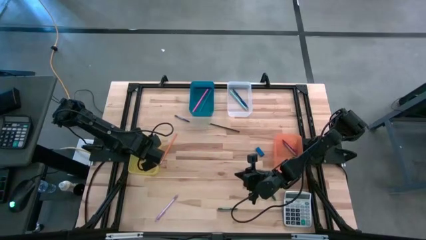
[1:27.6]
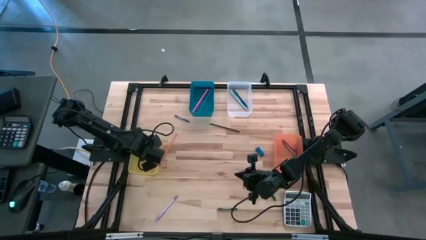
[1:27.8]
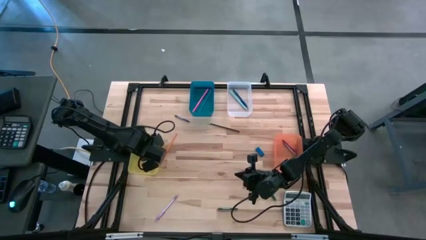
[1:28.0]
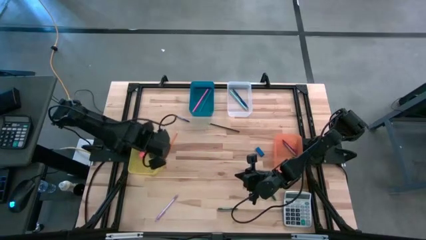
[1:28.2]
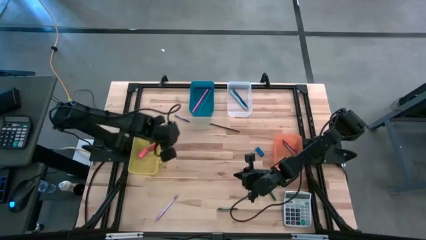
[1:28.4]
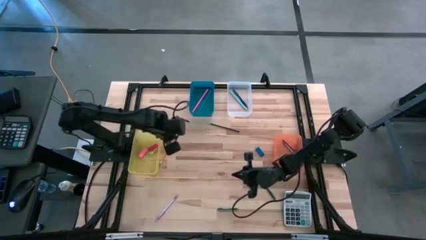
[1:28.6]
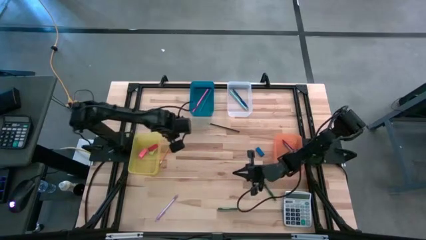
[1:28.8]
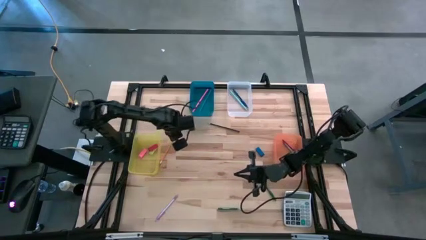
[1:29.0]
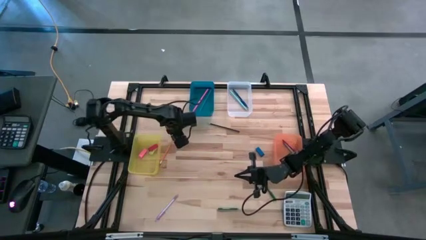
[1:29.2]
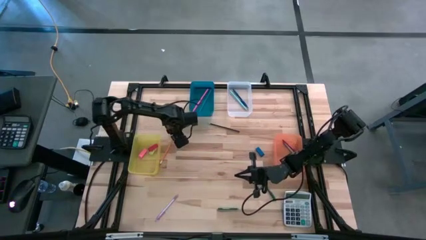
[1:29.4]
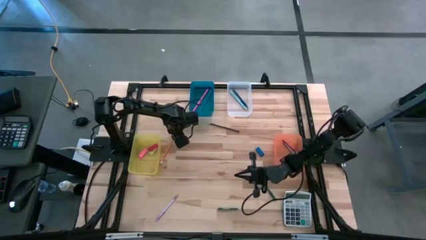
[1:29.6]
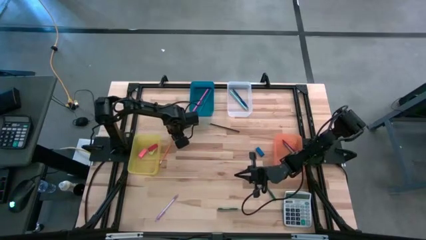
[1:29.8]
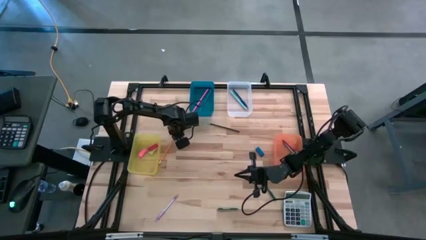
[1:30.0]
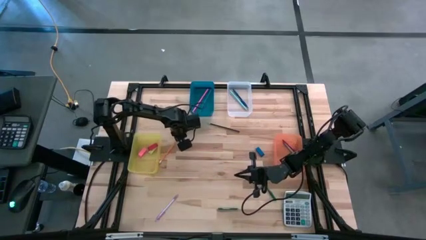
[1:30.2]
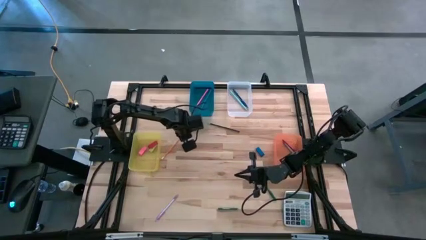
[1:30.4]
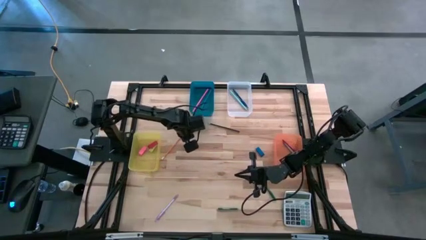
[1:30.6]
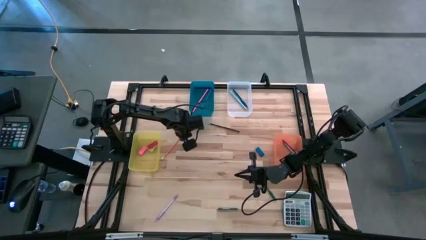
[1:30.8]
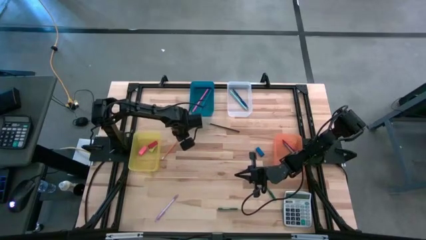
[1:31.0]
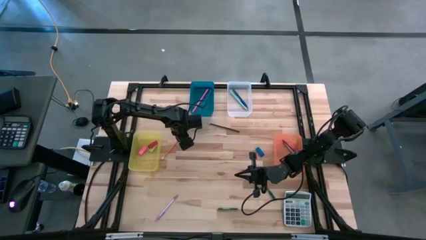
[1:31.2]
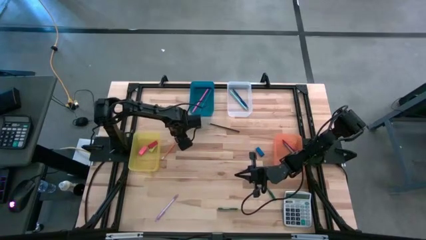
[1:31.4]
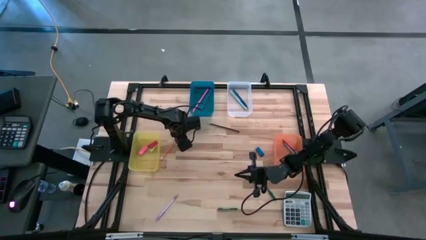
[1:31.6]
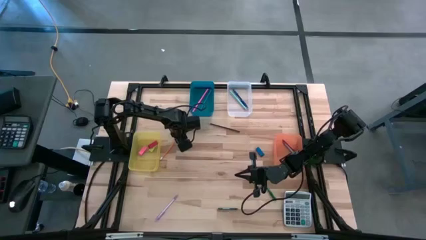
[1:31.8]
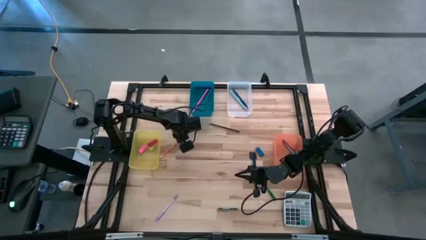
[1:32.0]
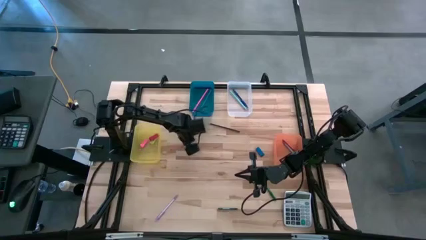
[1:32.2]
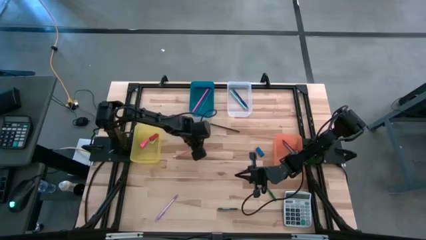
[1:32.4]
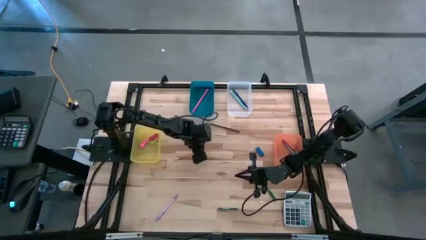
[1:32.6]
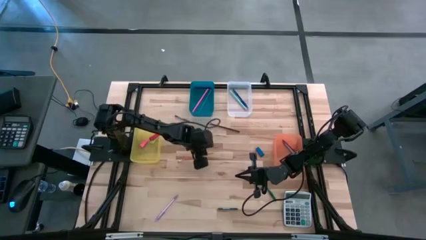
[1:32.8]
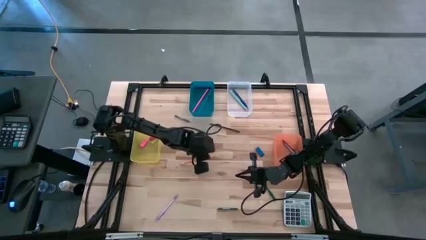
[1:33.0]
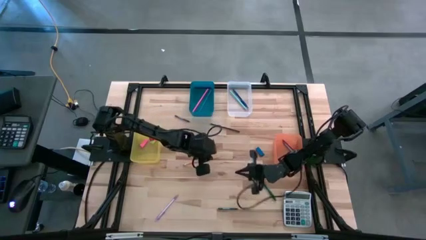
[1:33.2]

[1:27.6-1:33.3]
Task: Sort crayons/erasers/pens/pencils in bins
Put the orange pencil into the blue bin

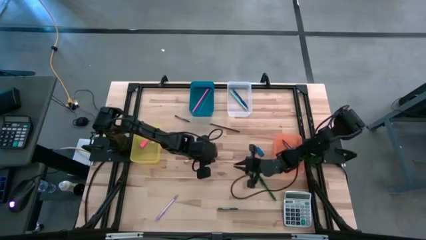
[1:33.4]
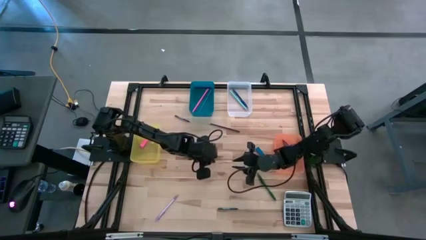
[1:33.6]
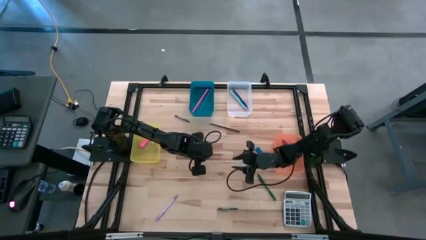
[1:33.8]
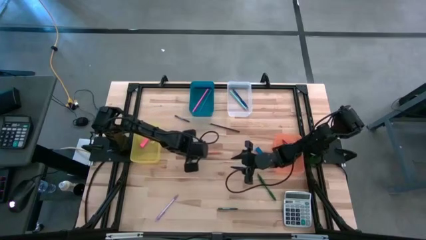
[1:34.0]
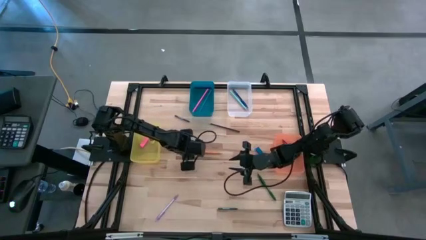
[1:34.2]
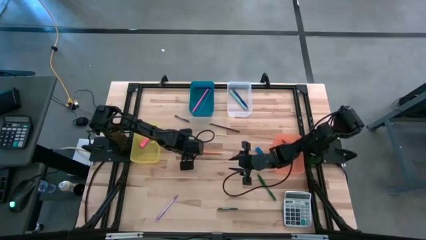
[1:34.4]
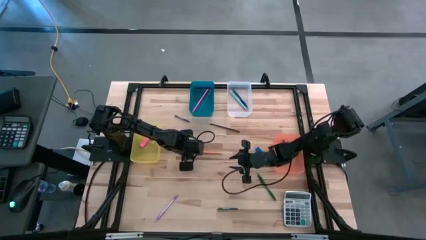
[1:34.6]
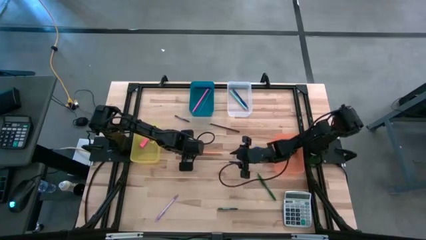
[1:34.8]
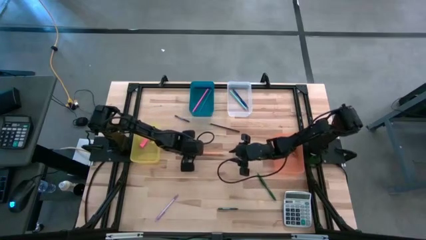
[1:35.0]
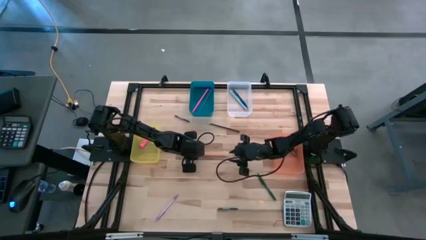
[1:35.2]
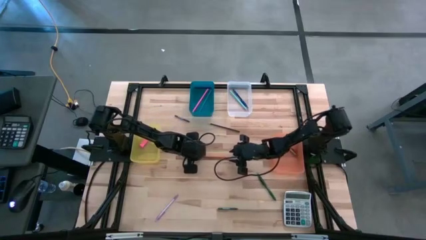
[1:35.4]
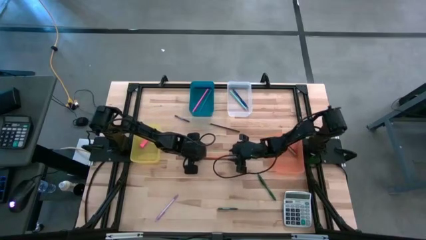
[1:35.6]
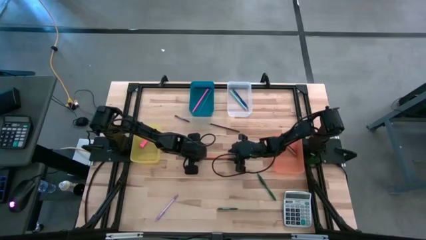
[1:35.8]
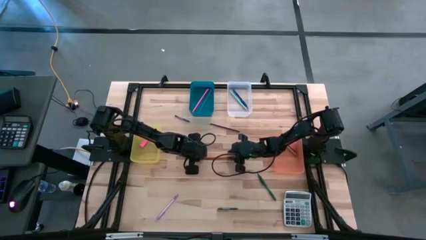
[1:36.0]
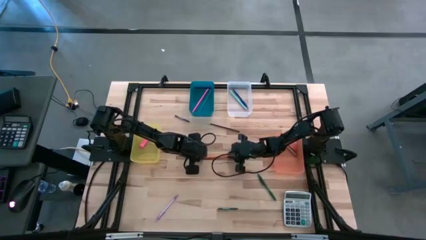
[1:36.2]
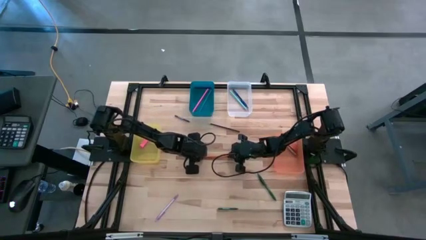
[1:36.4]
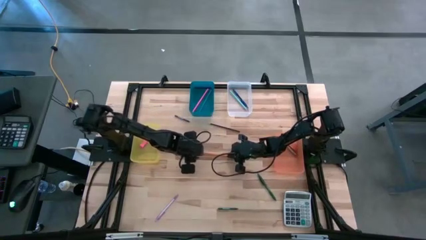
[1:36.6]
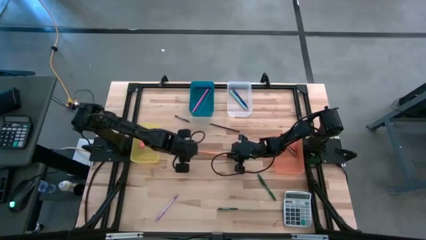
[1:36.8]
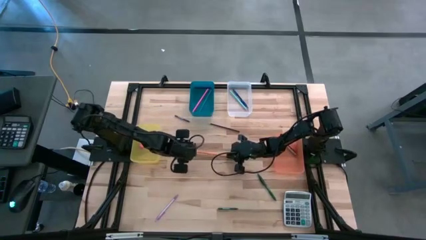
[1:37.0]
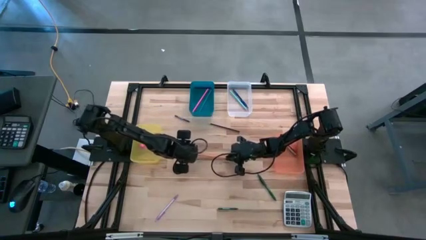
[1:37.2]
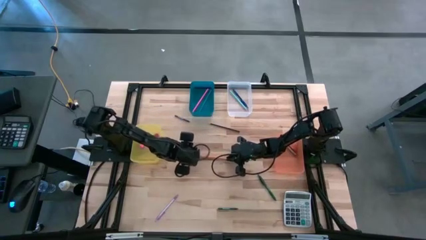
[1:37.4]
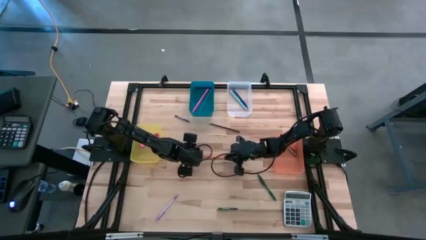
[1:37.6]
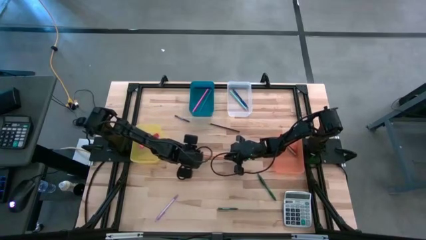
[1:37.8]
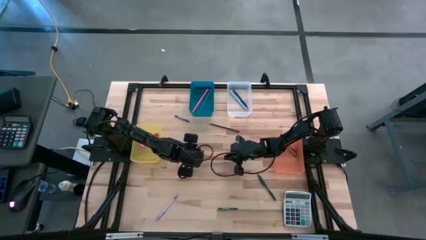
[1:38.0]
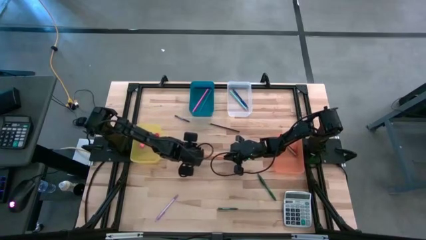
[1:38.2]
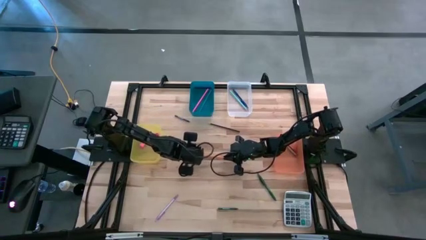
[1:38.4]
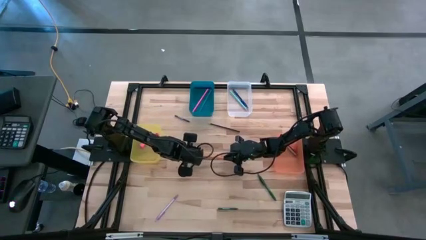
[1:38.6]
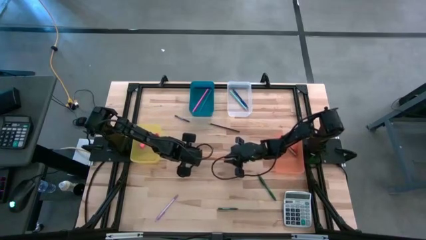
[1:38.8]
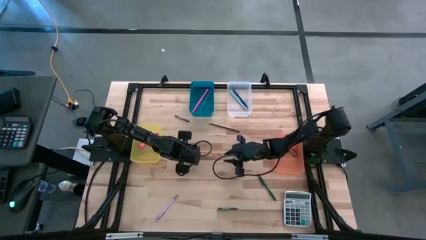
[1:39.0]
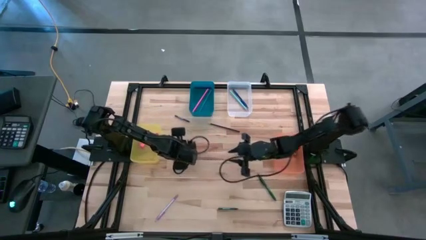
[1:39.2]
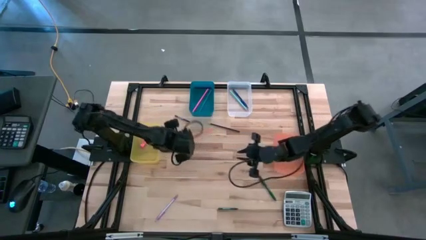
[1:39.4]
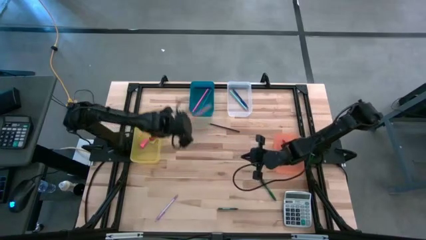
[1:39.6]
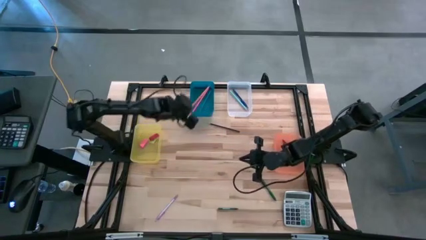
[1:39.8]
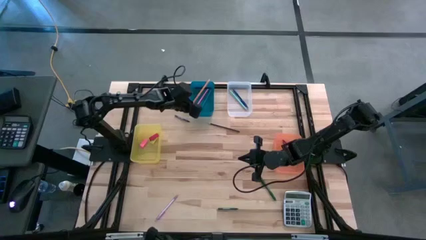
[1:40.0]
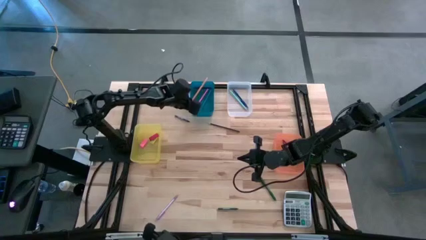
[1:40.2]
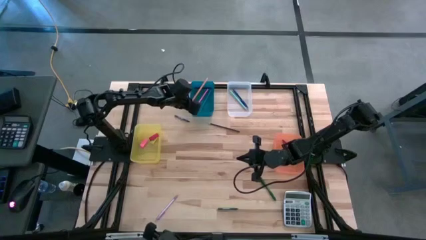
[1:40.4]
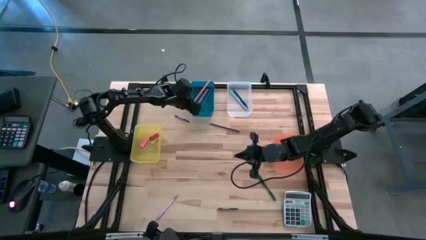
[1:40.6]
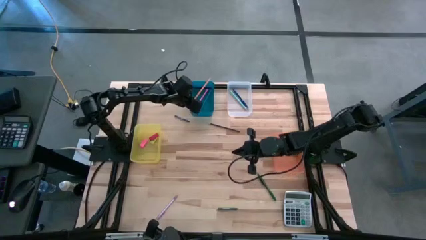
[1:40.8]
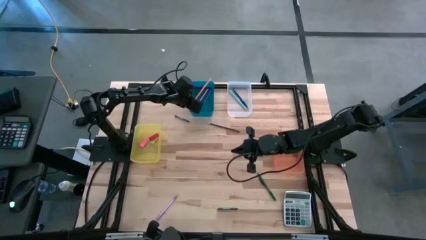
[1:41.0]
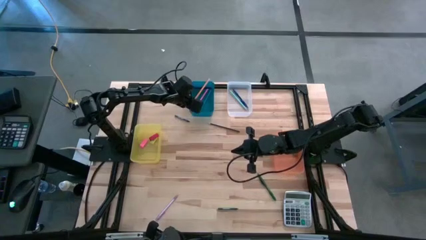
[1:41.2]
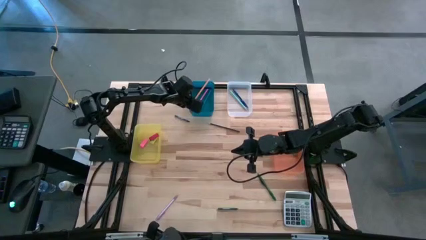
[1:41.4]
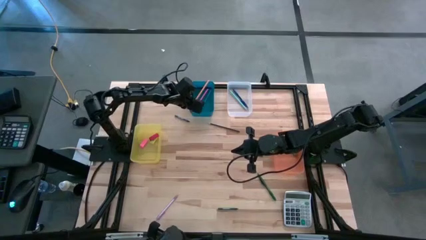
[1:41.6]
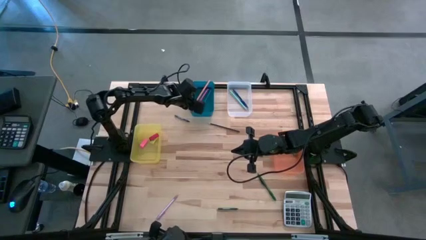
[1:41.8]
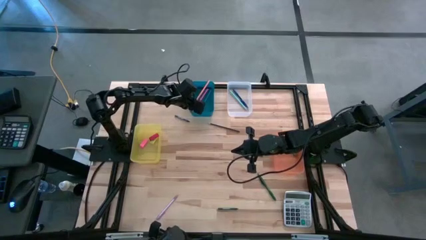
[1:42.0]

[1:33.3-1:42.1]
Put the orange pencil into the blue bin

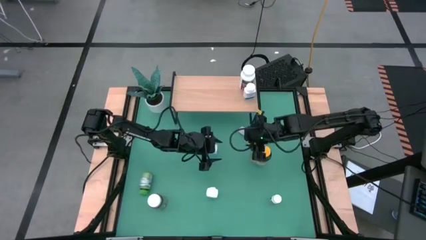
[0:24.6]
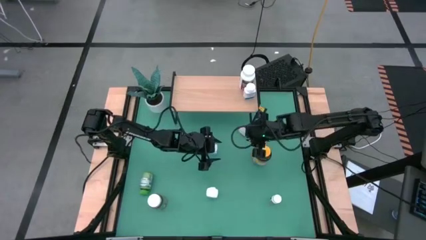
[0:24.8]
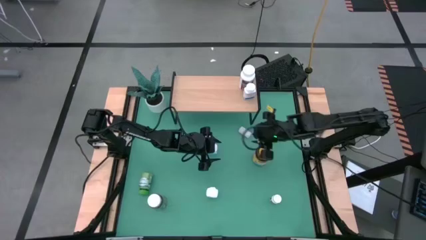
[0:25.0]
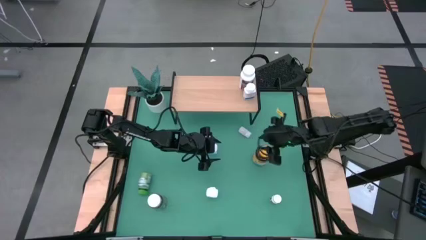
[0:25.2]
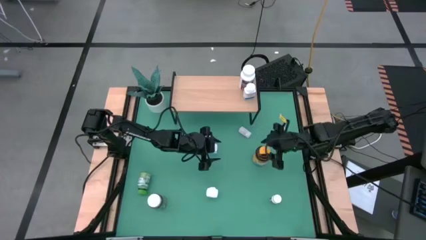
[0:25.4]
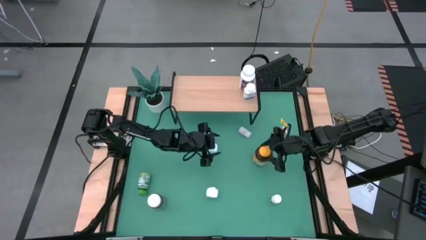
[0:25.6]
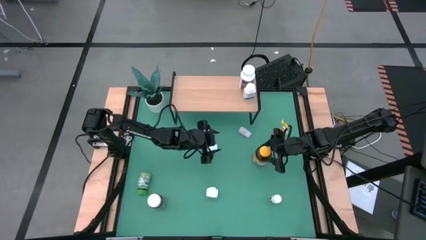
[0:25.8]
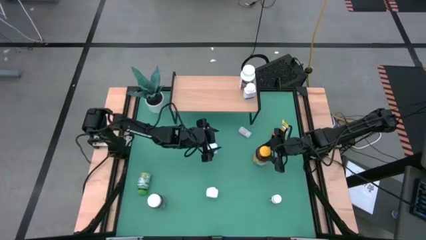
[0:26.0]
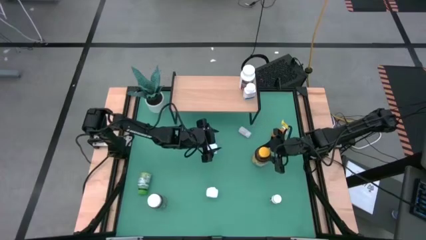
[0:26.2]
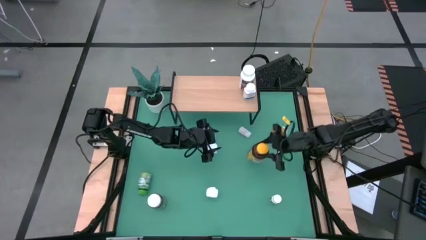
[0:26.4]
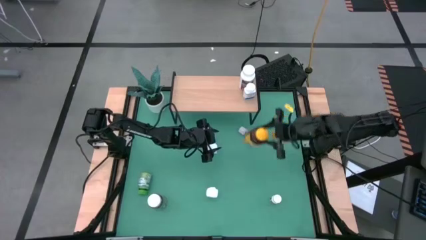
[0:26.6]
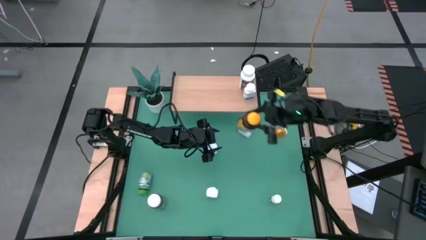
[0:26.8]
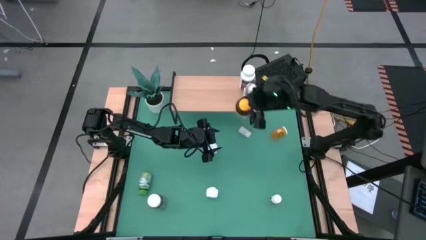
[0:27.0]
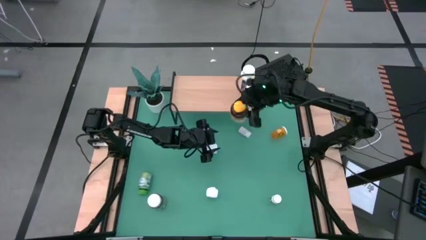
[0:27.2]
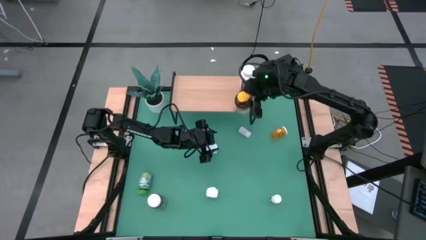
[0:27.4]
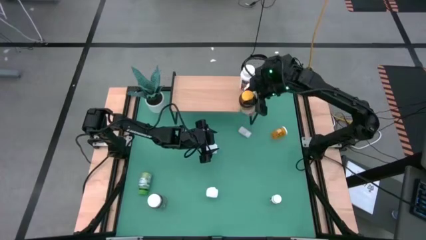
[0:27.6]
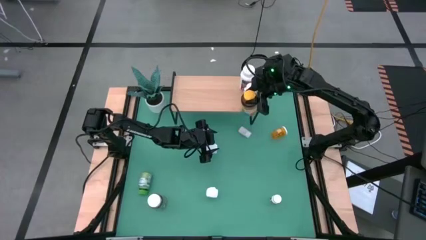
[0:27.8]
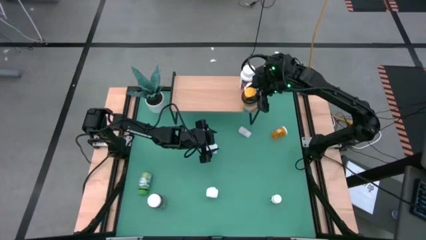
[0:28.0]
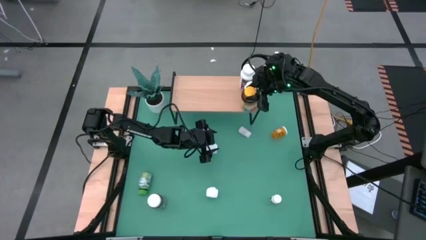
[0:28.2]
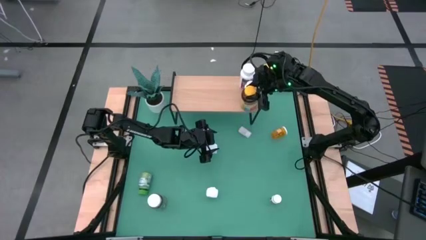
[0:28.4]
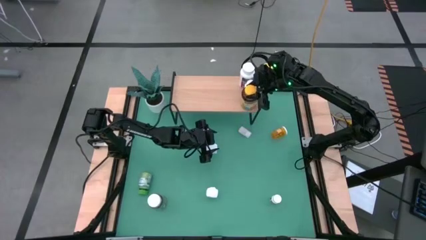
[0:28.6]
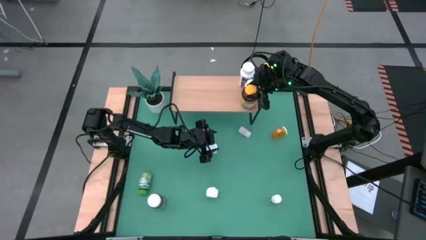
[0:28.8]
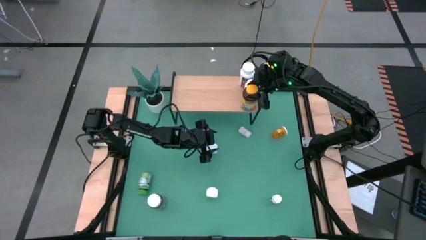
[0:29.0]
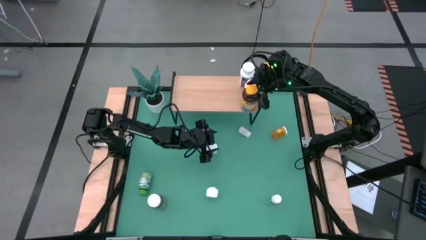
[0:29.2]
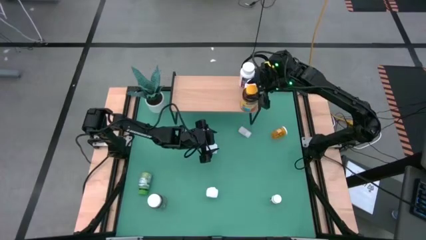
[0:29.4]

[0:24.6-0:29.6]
Task: Pick and place medicine bottles onto shelf by color
Put the yellow medicine bottle on the shelf
